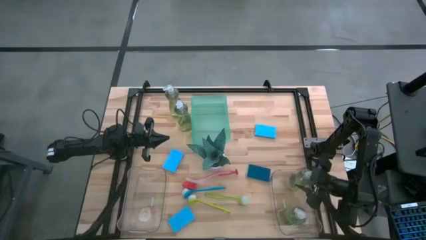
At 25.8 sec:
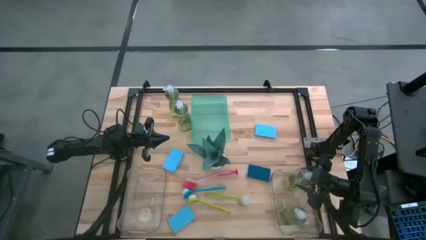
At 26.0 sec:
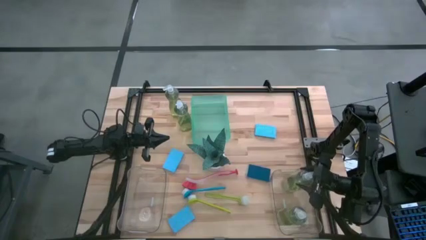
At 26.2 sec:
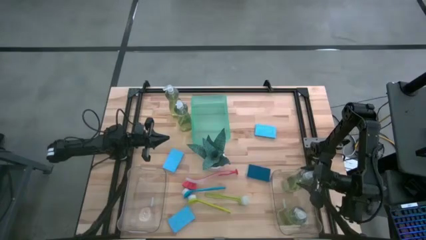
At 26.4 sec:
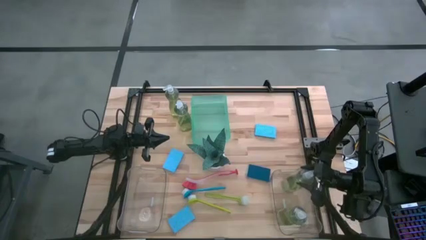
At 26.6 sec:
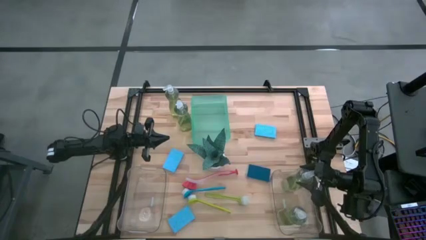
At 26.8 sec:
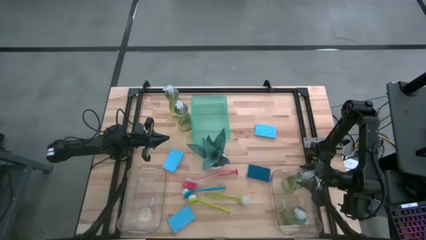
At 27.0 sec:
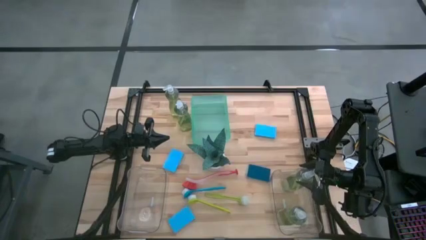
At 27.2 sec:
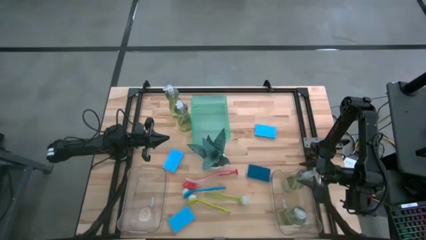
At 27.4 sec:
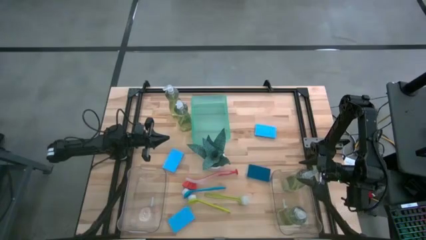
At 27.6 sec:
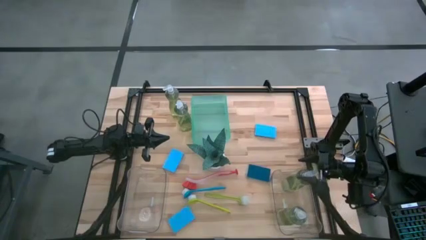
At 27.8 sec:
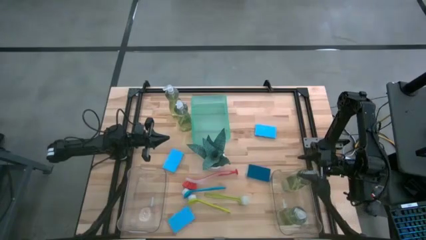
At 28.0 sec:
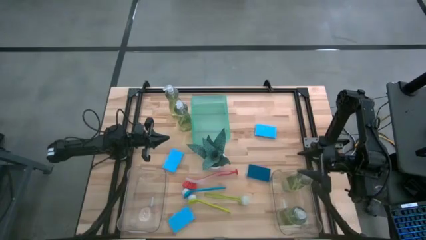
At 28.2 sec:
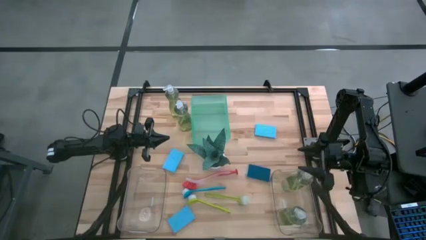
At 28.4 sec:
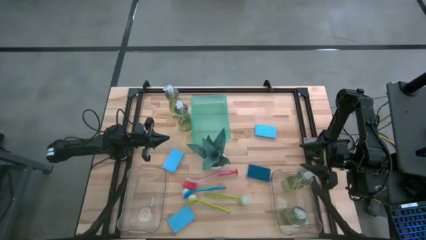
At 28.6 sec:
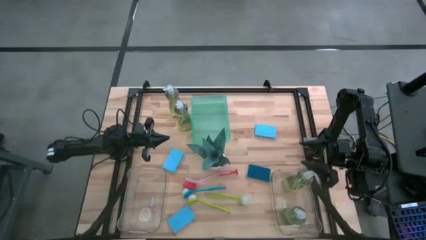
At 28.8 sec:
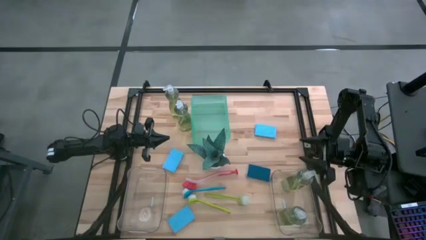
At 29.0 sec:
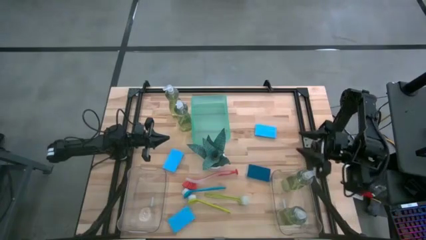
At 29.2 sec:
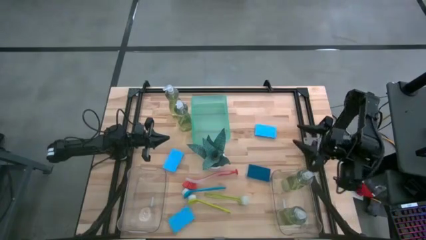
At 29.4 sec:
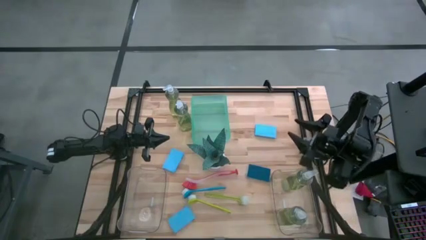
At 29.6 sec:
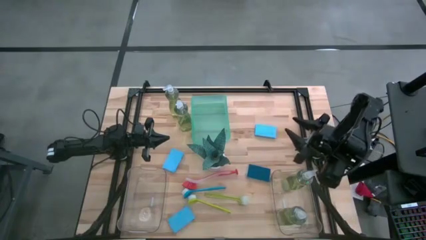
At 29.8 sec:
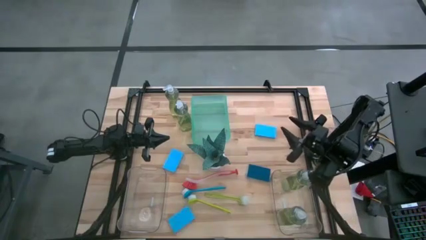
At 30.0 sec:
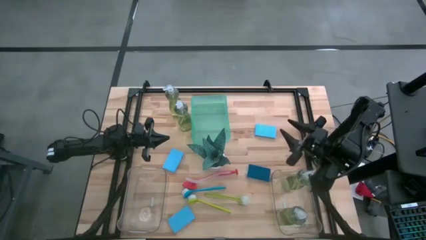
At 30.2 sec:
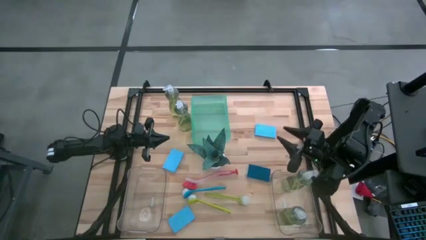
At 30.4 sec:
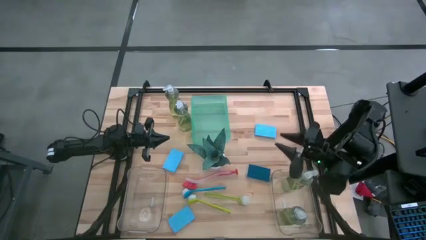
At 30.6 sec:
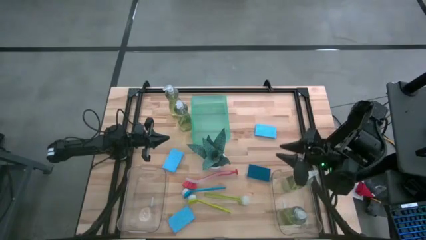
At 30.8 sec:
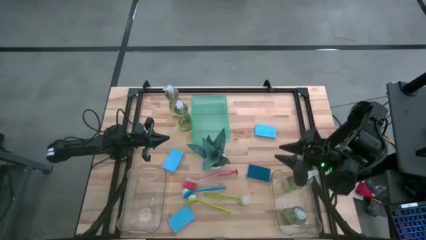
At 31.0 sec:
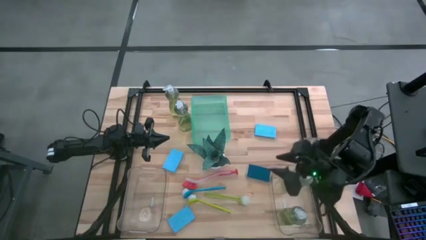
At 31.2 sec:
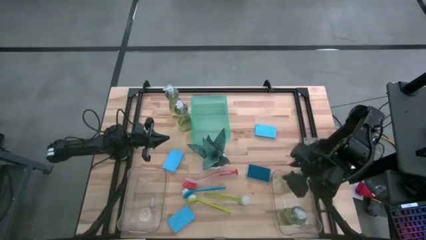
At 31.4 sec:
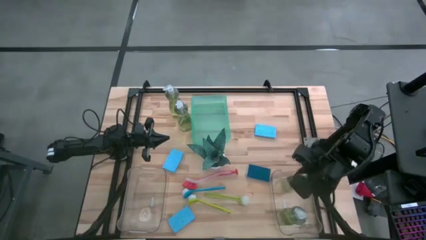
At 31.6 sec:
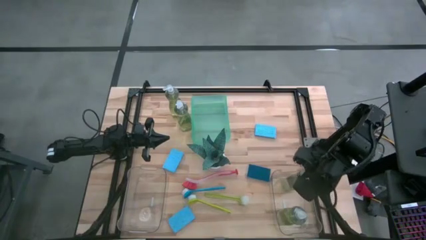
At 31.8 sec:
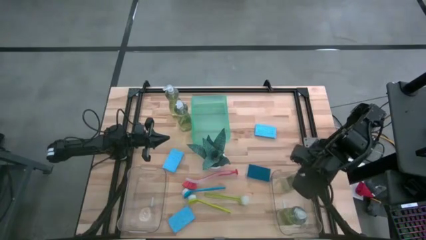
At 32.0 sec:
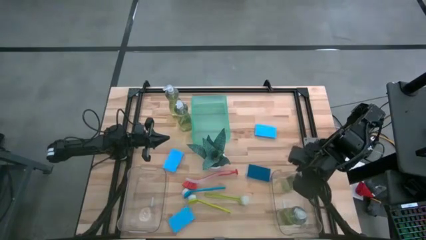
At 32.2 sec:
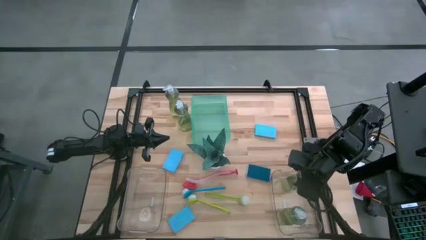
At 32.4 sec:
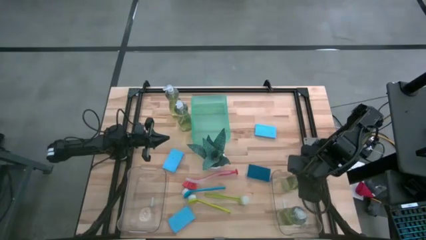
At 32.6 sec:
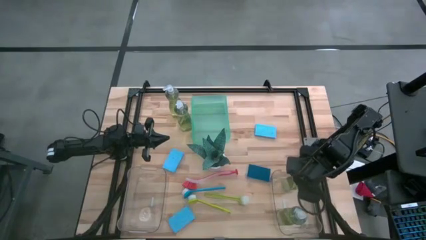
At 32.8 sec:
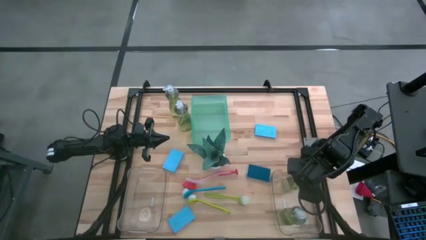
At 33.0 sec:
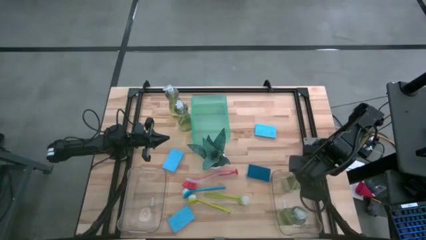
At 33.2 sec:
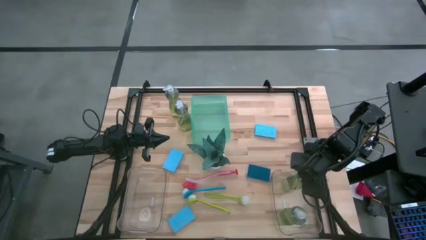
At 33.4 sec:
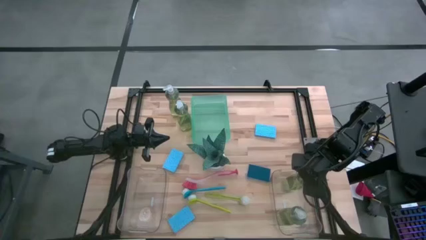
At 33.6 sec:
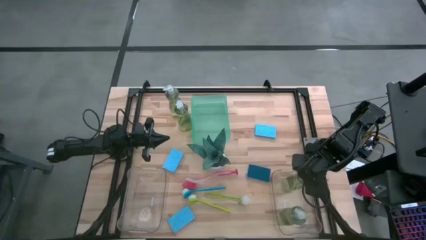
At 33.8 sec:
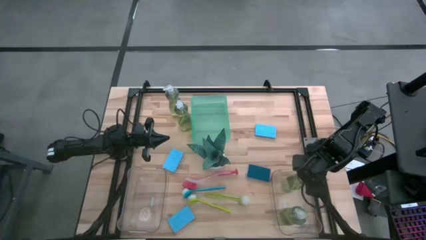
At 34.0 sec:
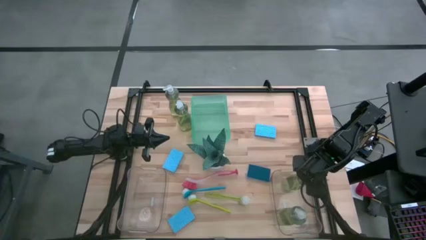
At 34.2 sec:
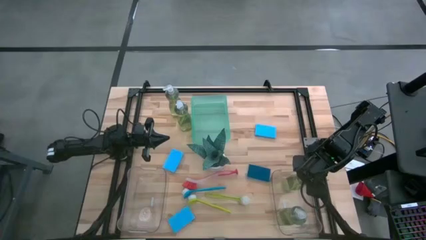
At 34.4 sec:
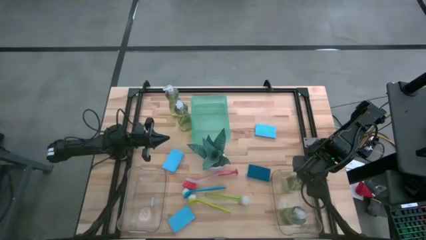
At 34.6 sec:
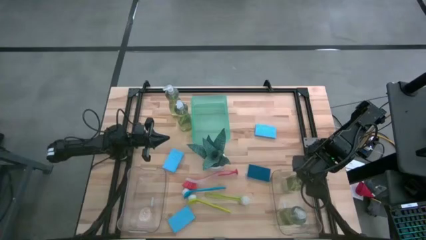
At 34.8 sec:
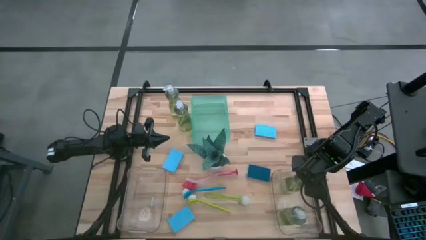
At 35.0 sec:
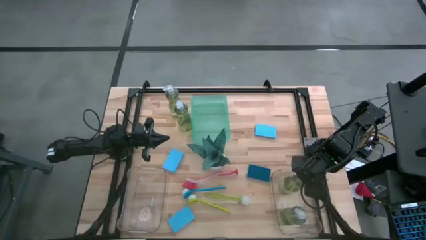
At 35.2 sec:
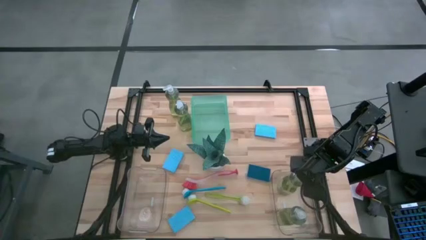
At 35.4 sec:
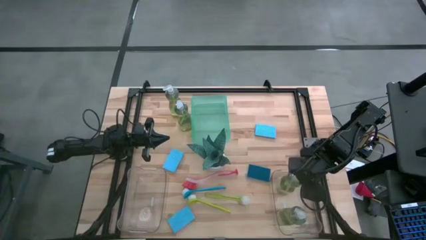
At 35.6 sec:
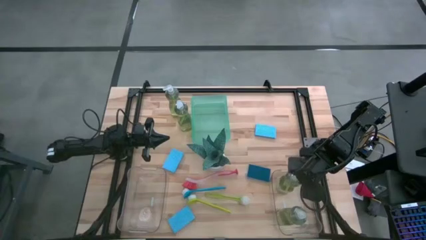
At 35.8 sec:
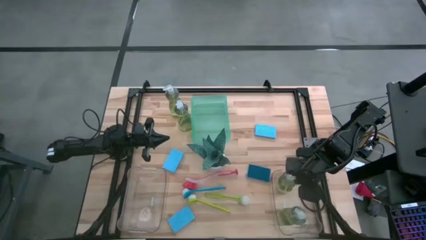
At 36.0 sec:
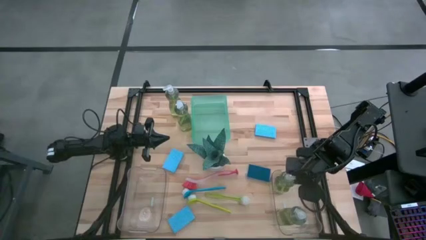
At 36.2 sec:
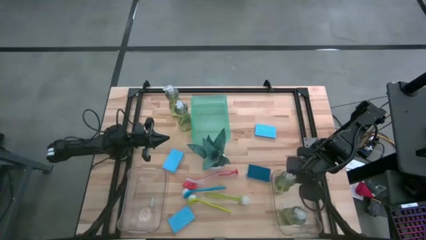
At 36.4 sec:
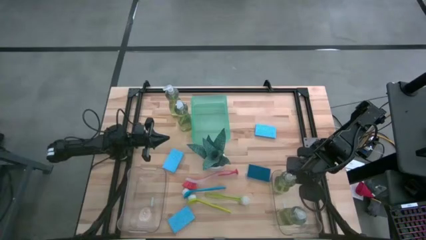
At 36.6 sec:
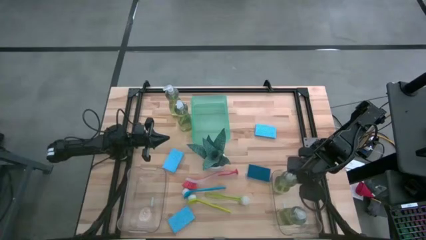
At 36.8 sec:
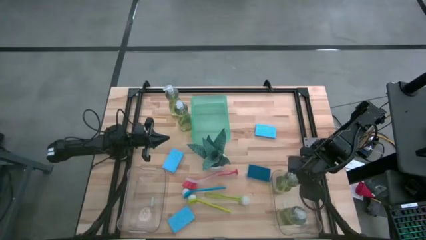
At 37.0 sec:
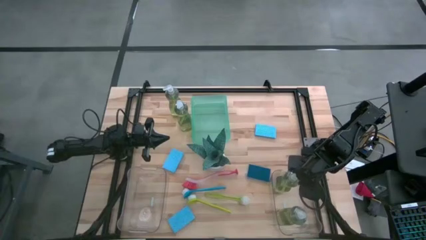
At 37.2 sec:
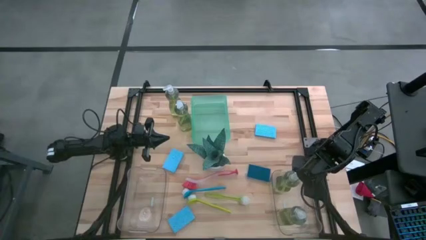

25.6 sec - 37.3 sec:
Task: Pick & Place Kitchen Sink Supplies
Put the yellow soap dispenser into the right transparent bin
